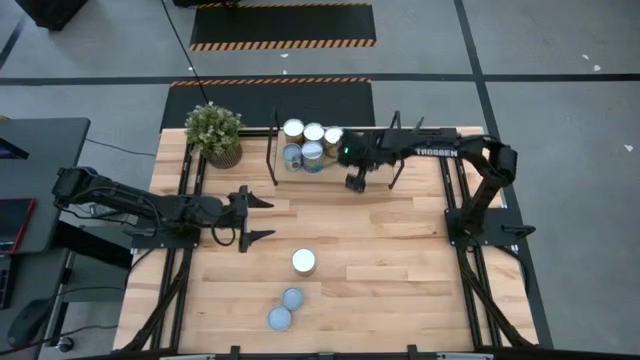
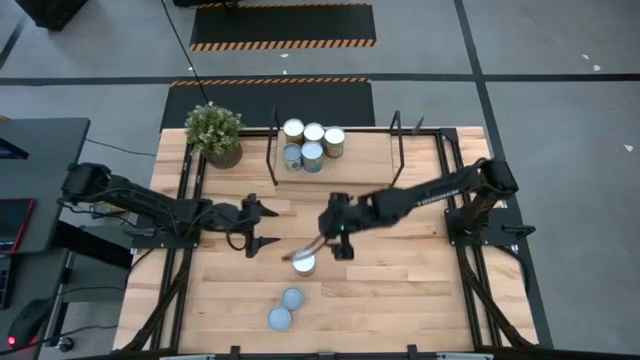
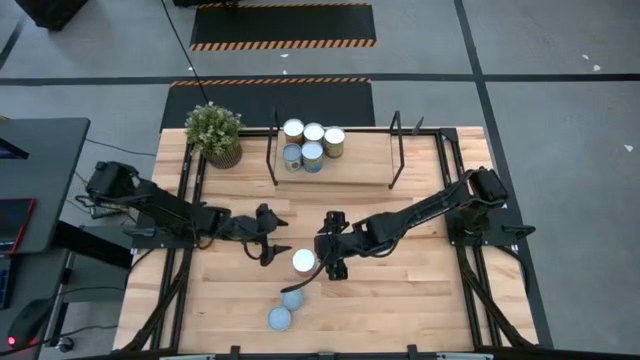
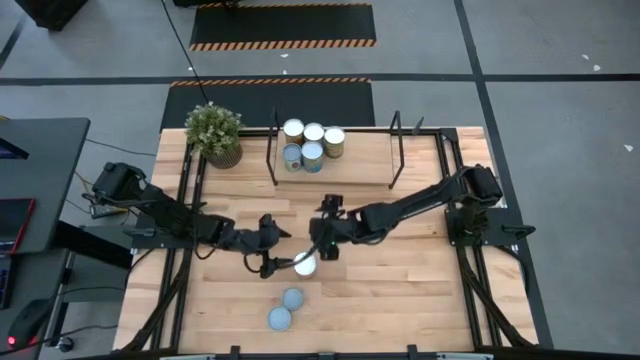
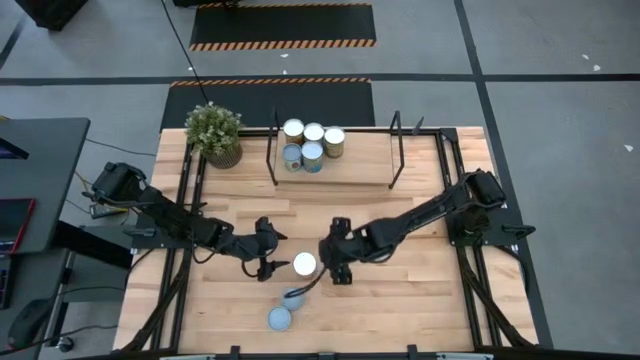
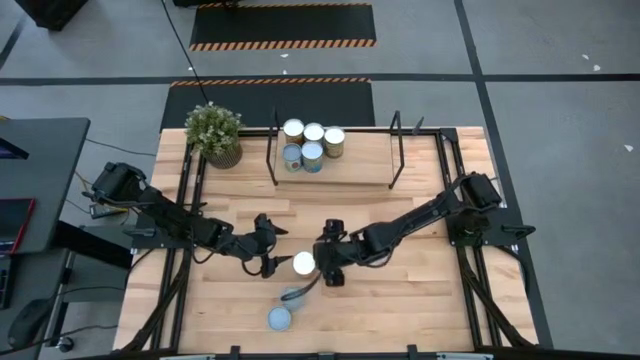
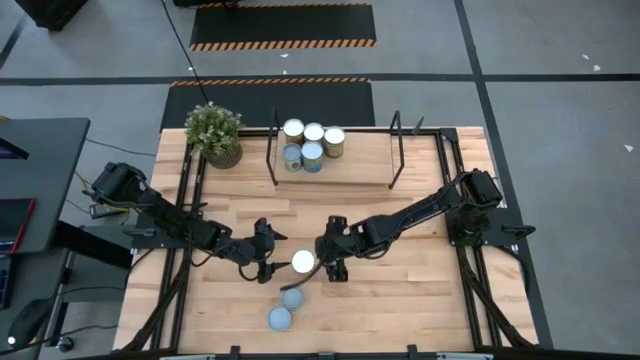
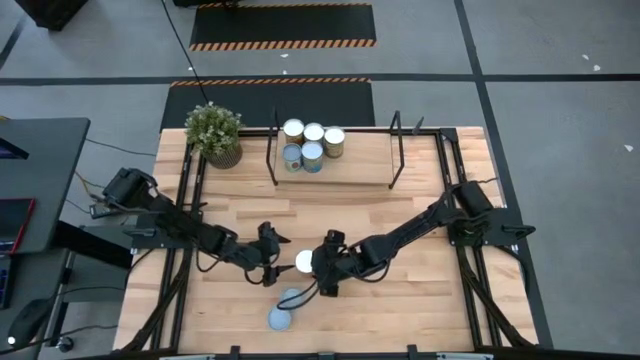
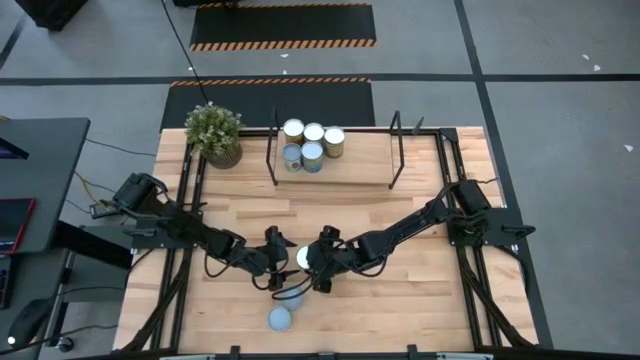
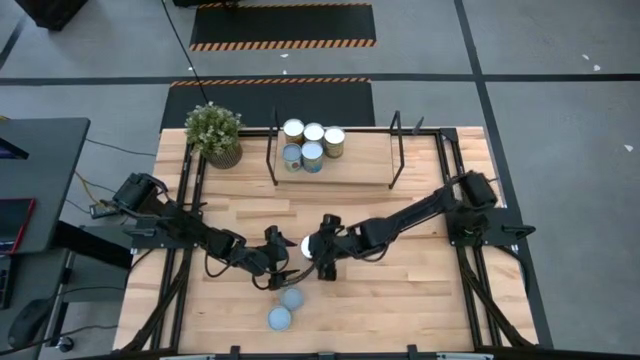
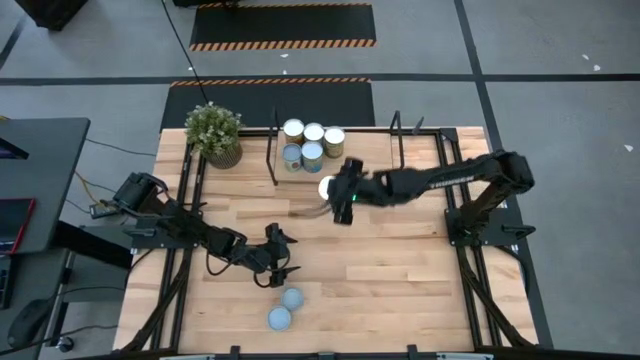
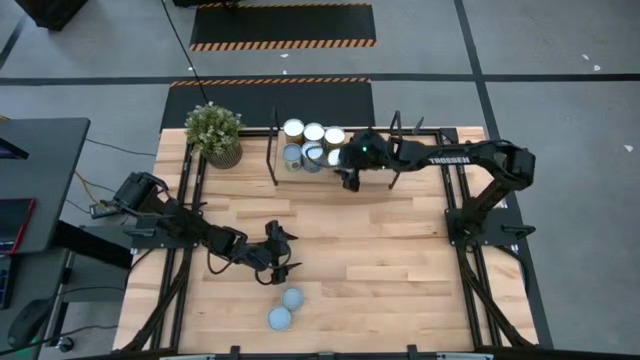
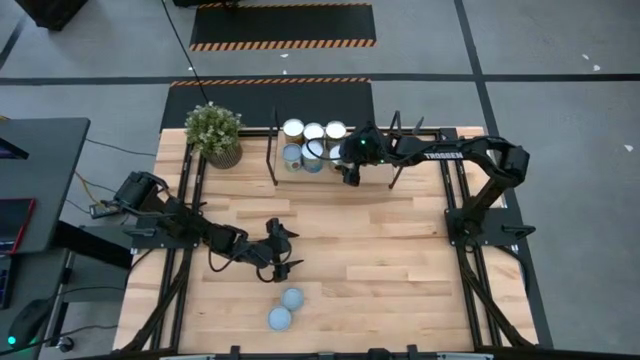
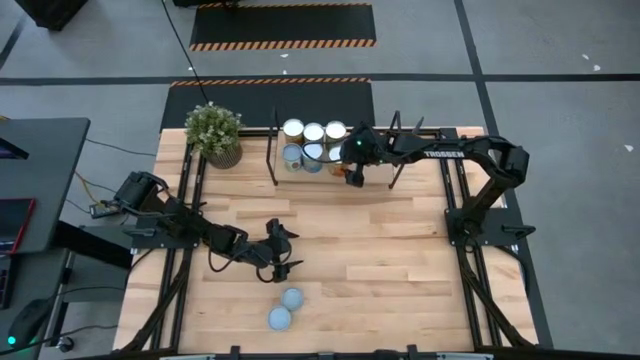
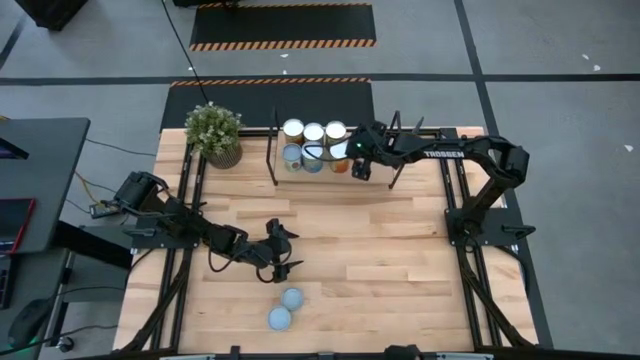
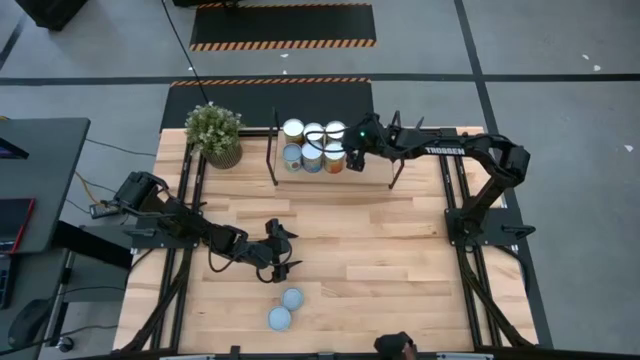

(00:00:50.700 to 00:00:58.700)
Task: Pick and place cans onto a shelf
Put the canned pineapple on the shelf

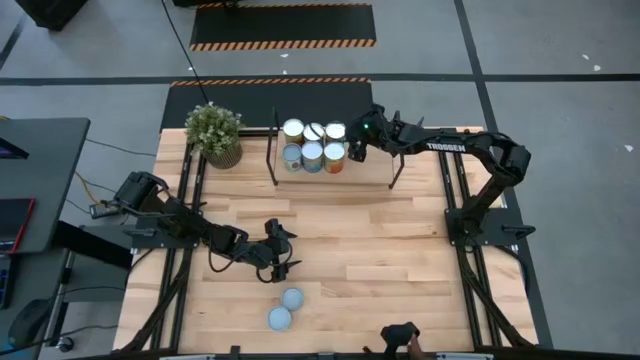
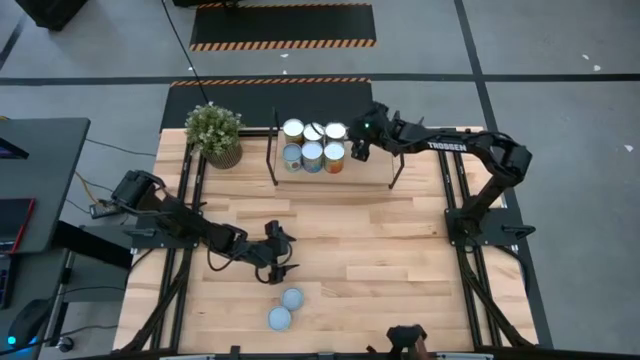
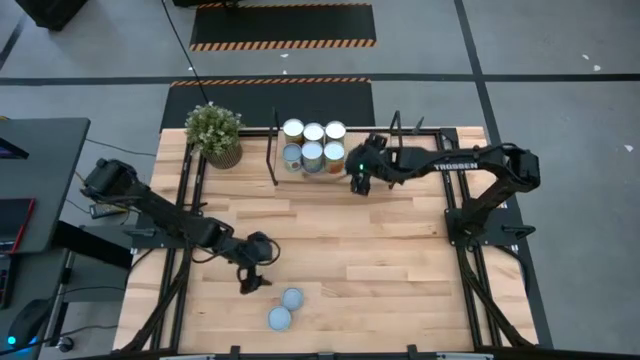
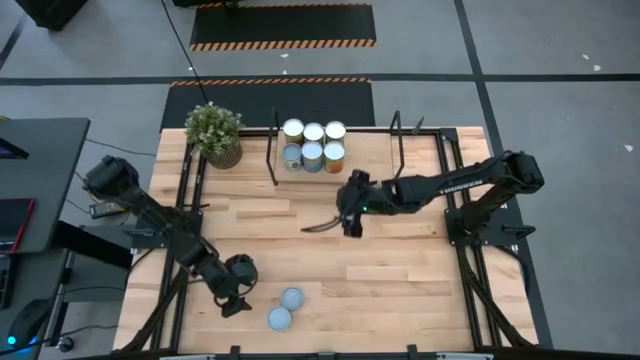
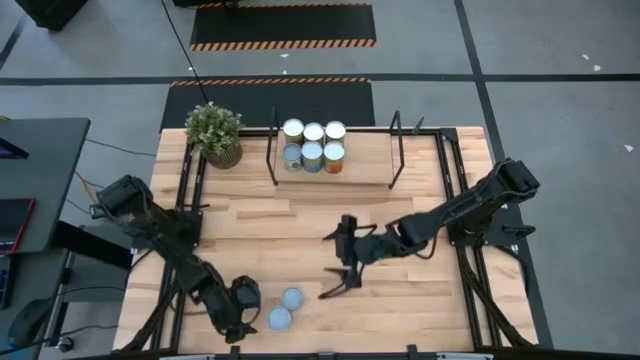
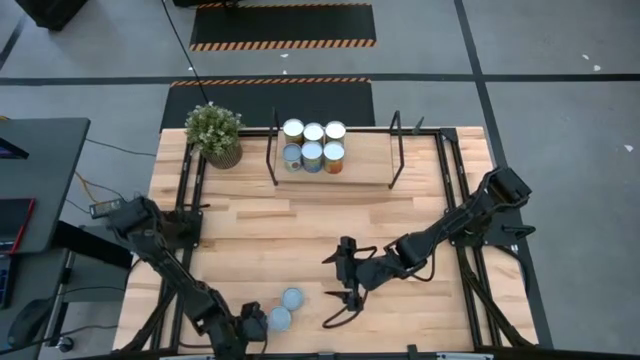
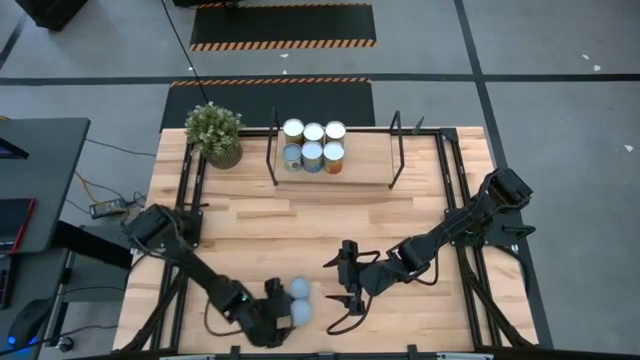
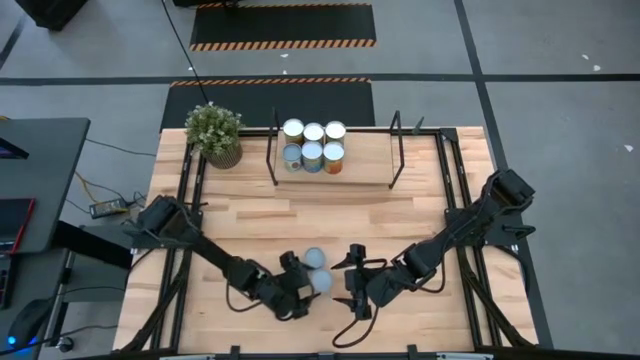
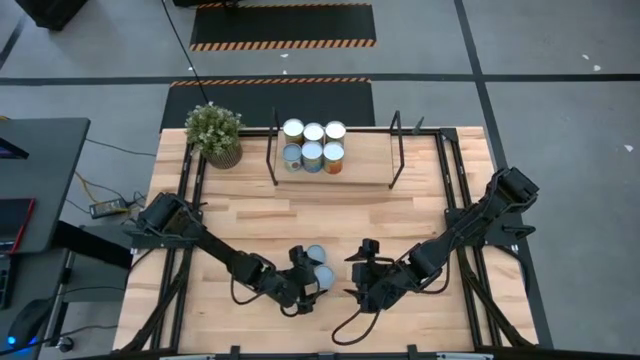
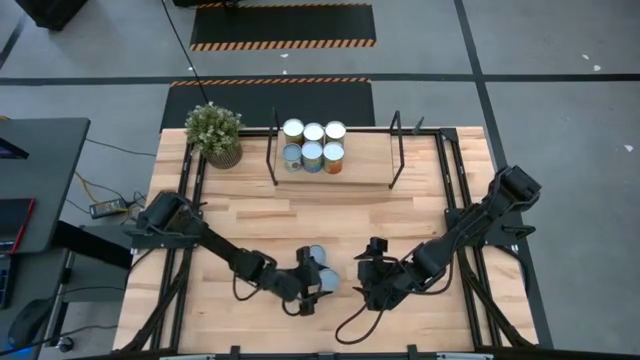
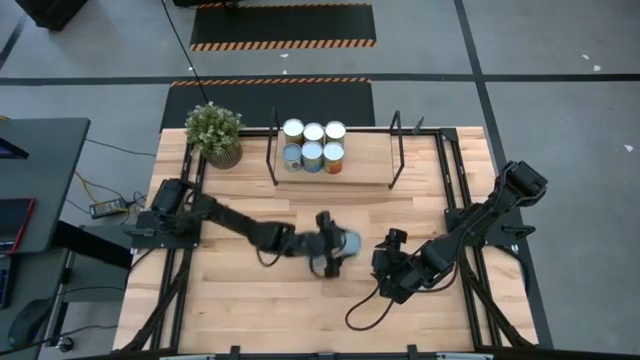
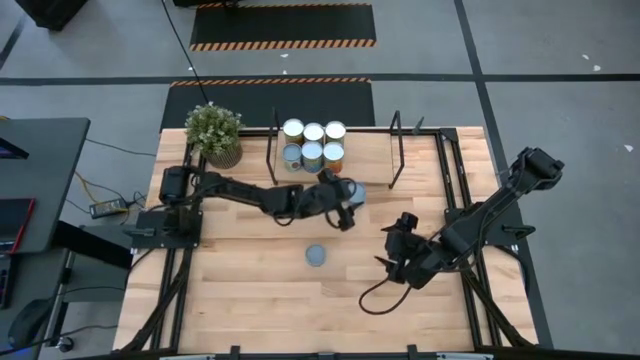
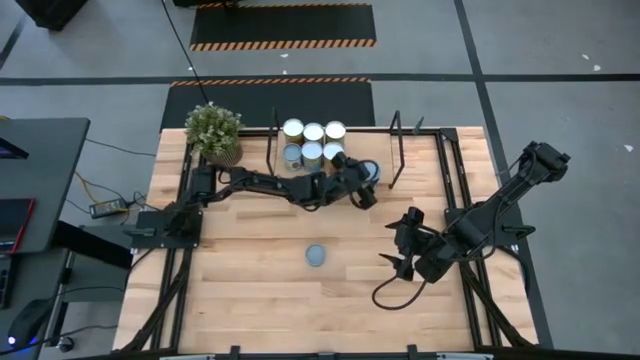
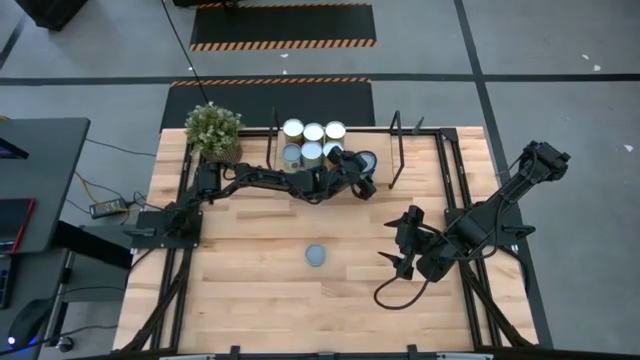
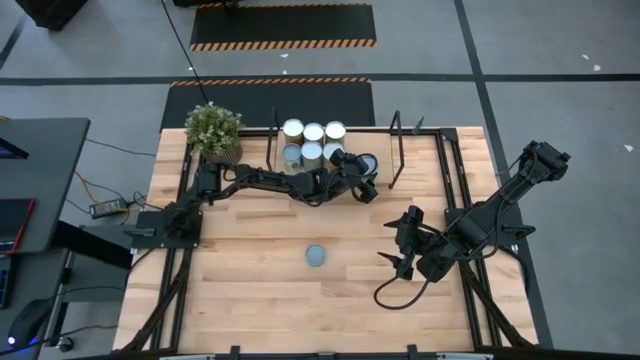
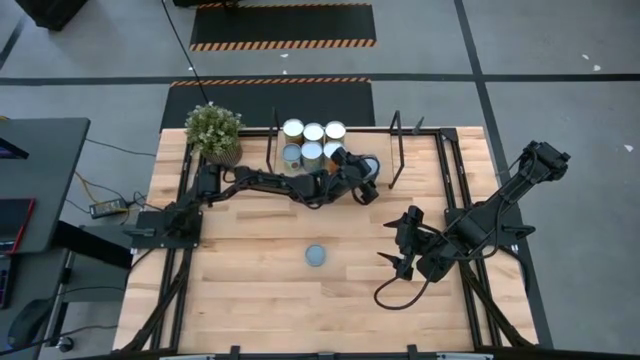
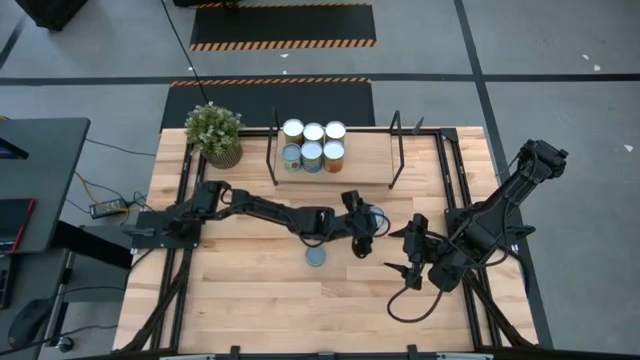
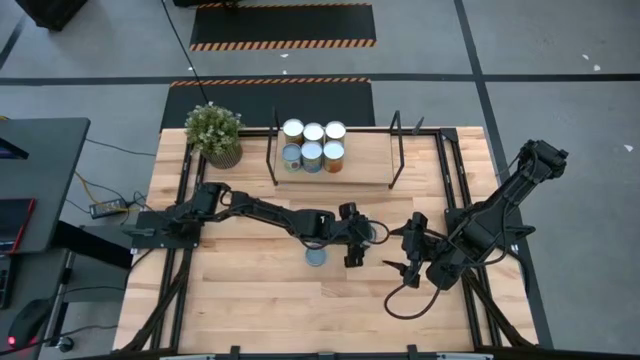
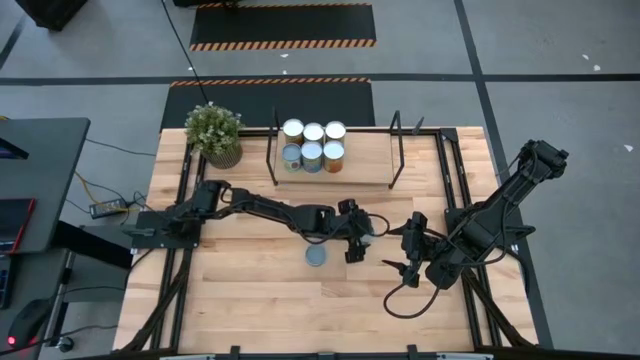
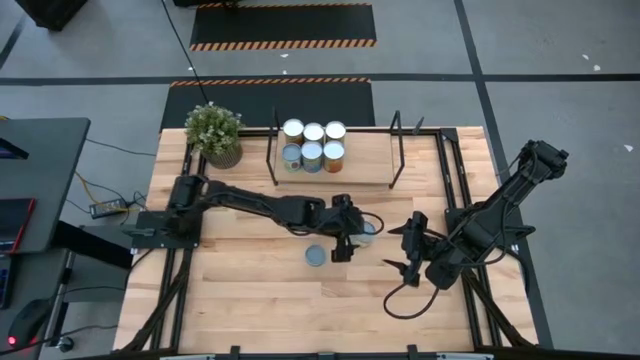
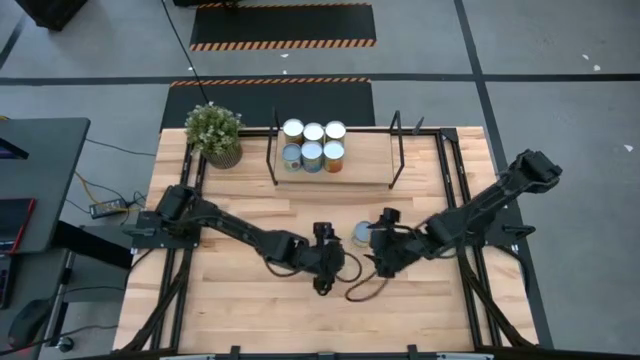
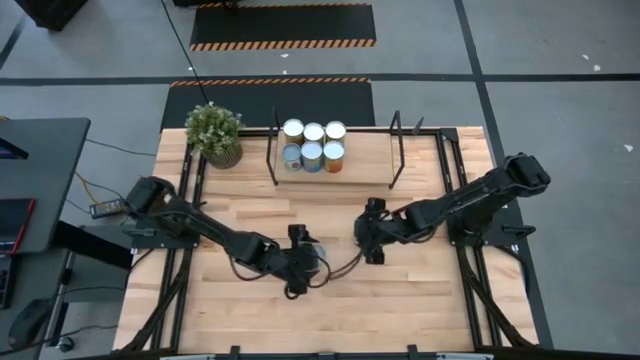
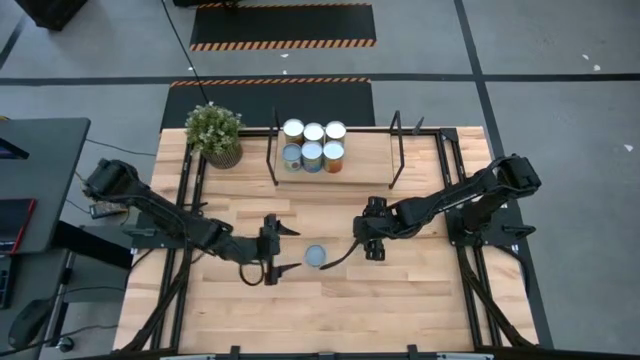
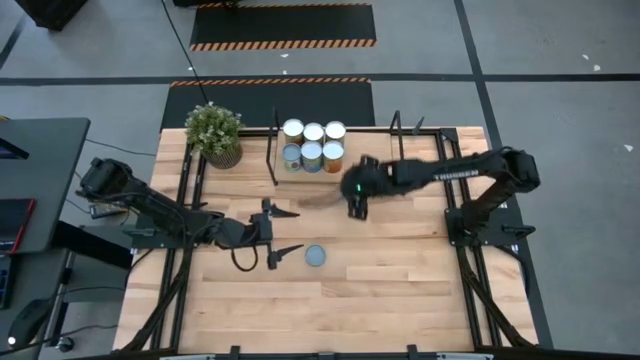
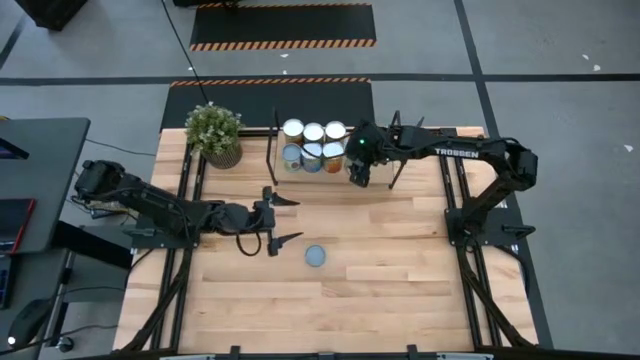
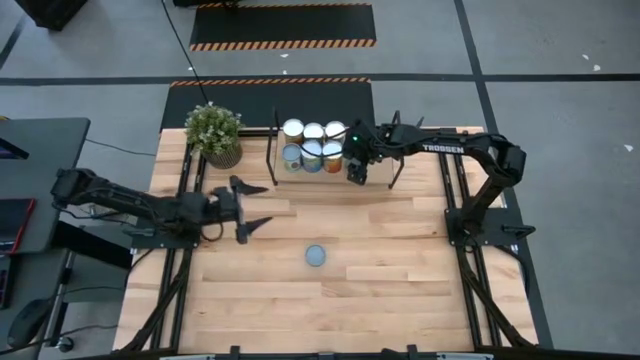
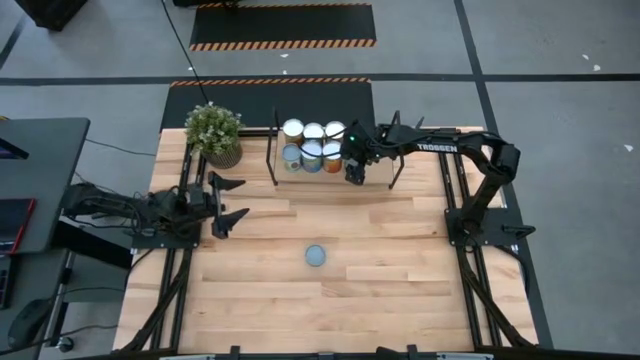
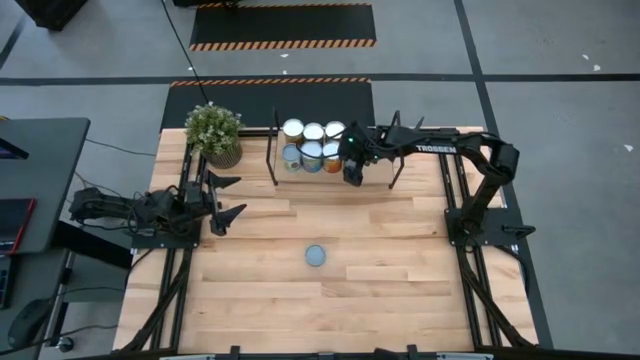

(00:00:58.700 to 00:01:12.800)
Put the canned chicken soup on the shelf
